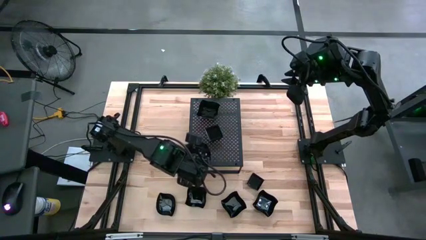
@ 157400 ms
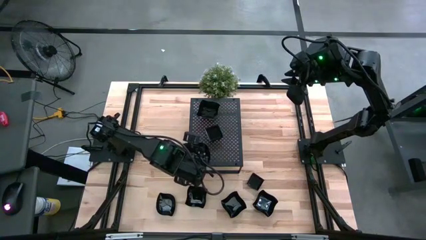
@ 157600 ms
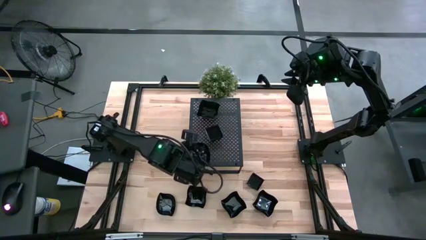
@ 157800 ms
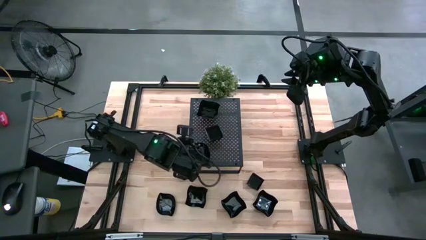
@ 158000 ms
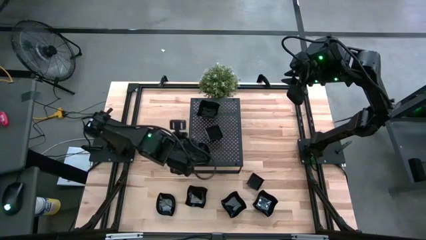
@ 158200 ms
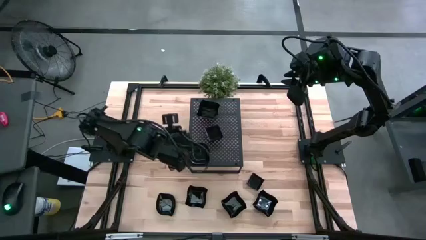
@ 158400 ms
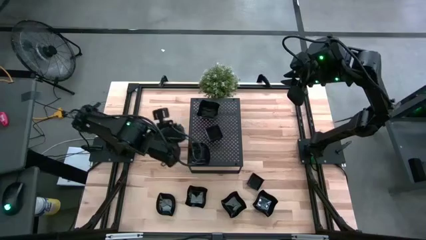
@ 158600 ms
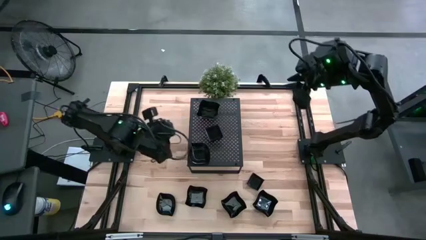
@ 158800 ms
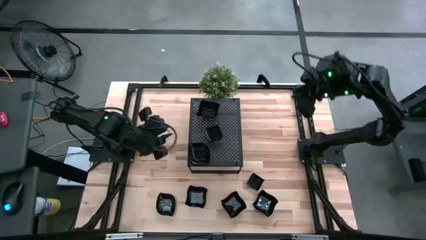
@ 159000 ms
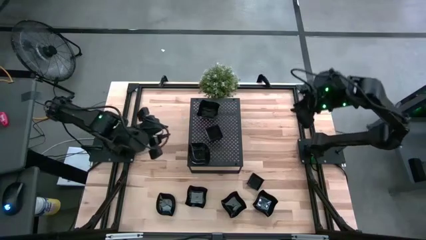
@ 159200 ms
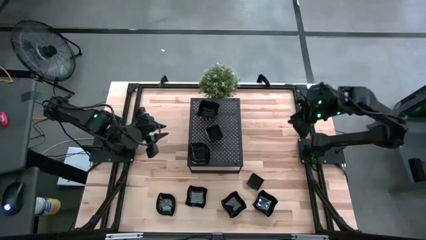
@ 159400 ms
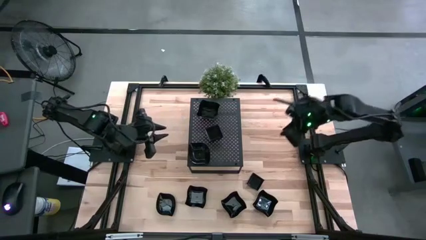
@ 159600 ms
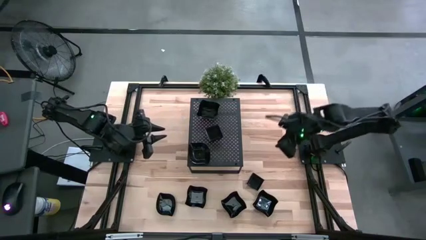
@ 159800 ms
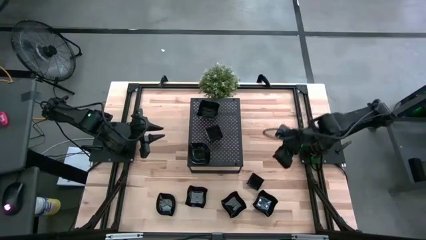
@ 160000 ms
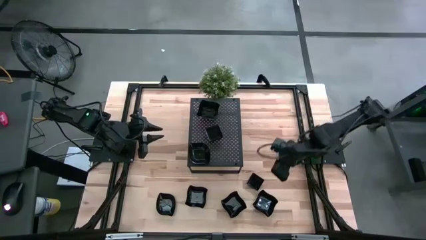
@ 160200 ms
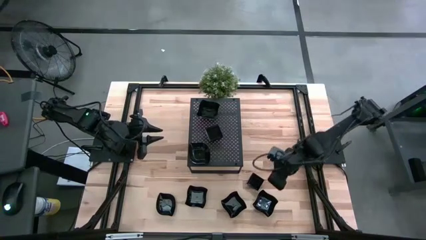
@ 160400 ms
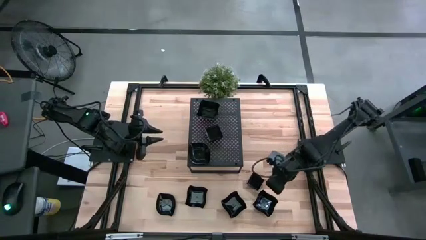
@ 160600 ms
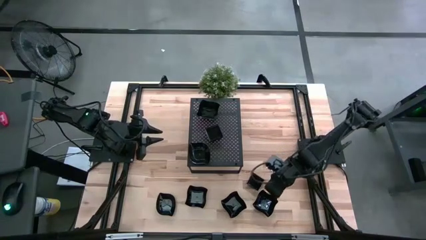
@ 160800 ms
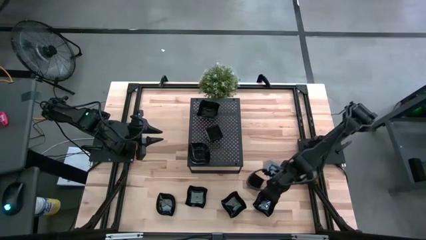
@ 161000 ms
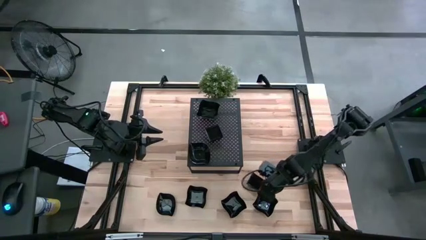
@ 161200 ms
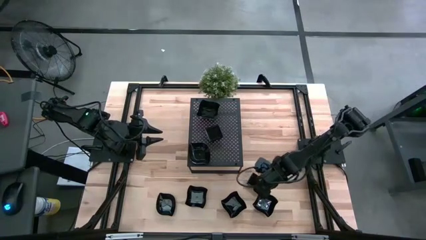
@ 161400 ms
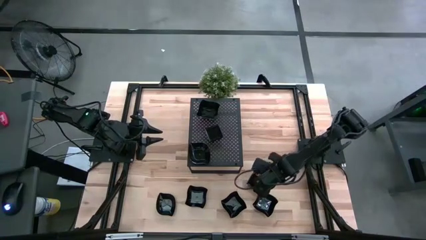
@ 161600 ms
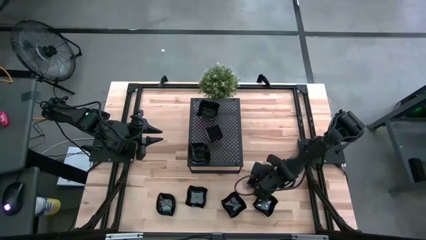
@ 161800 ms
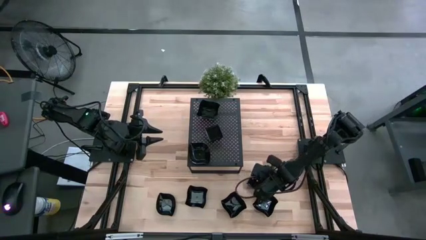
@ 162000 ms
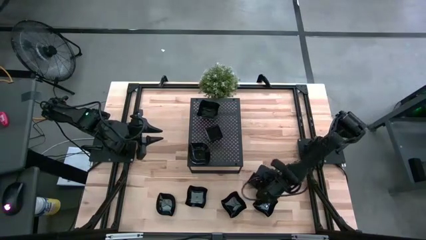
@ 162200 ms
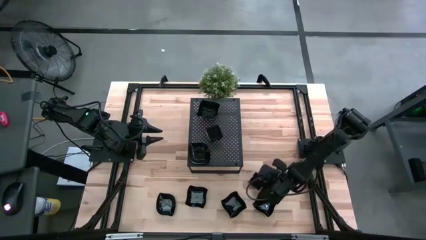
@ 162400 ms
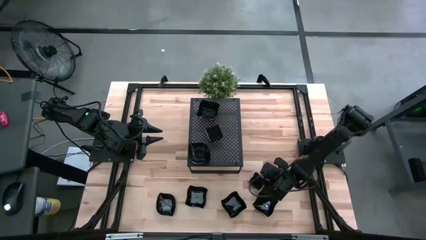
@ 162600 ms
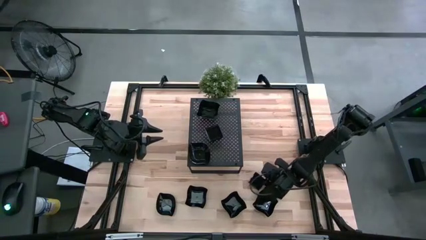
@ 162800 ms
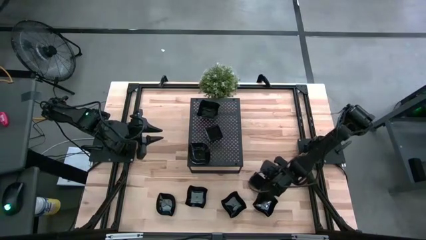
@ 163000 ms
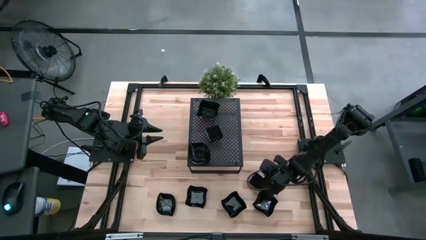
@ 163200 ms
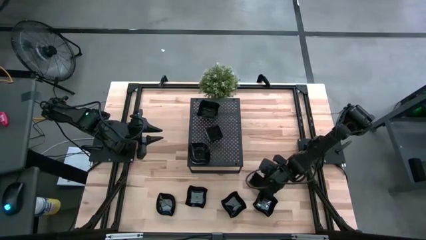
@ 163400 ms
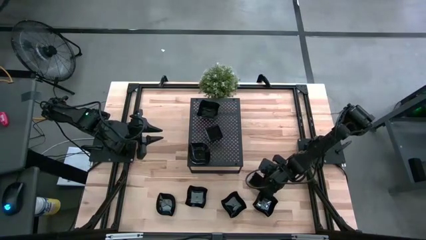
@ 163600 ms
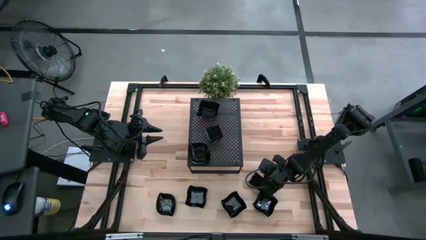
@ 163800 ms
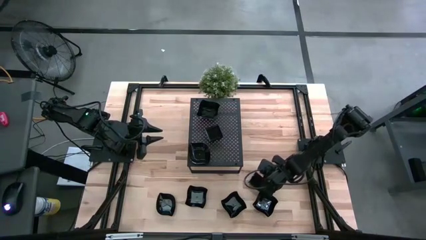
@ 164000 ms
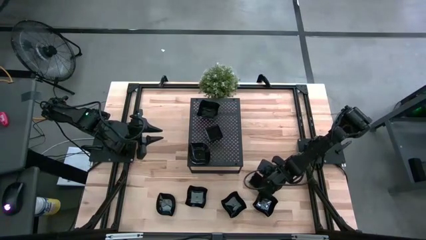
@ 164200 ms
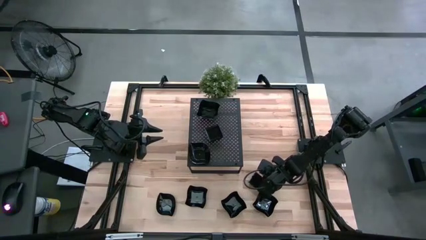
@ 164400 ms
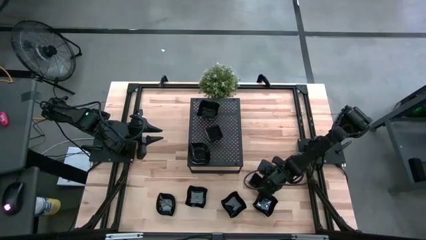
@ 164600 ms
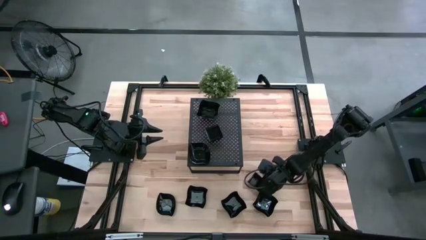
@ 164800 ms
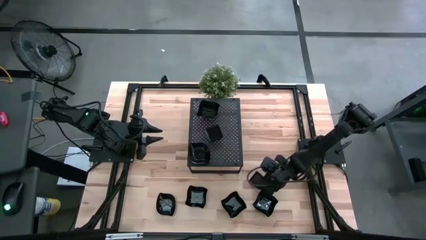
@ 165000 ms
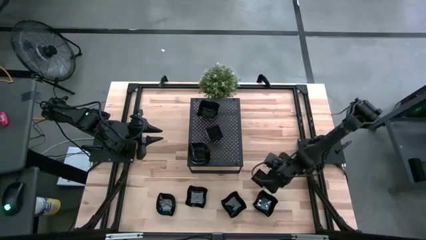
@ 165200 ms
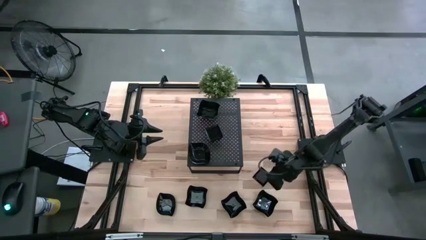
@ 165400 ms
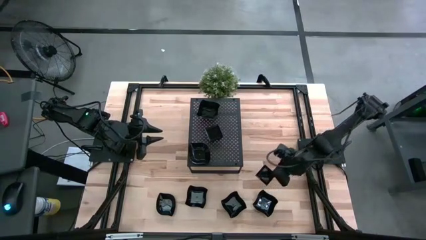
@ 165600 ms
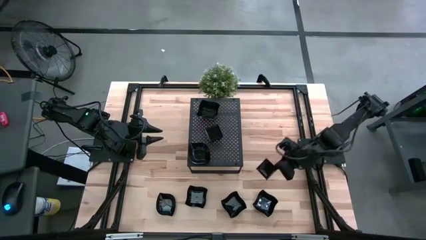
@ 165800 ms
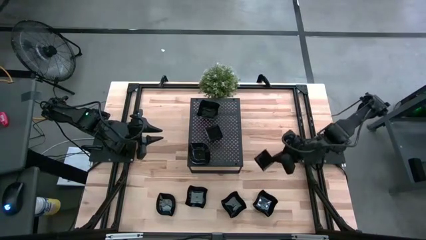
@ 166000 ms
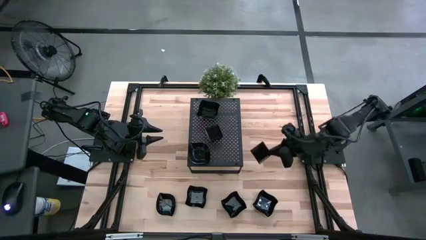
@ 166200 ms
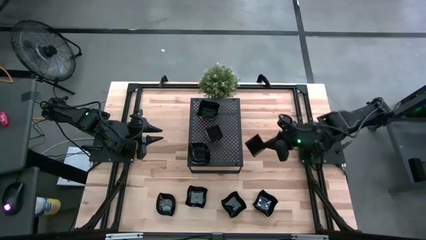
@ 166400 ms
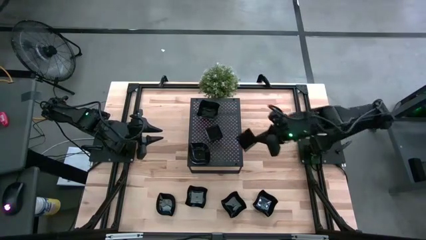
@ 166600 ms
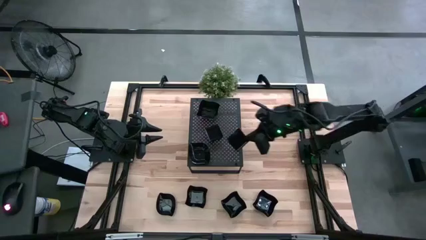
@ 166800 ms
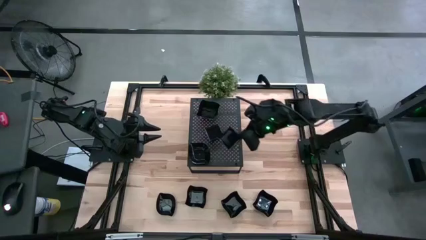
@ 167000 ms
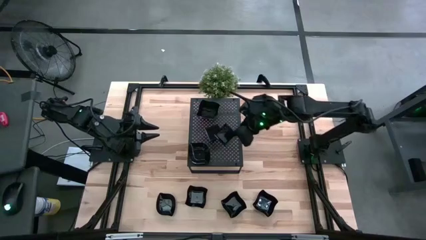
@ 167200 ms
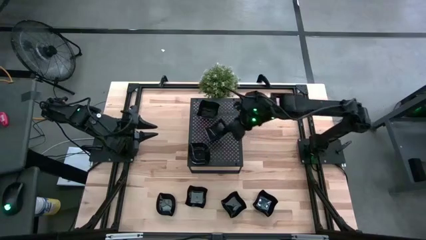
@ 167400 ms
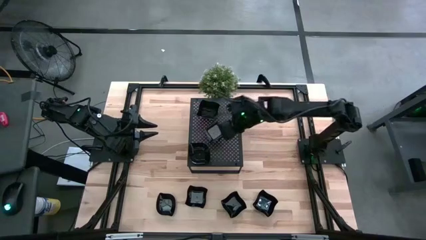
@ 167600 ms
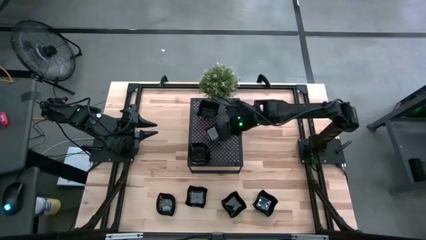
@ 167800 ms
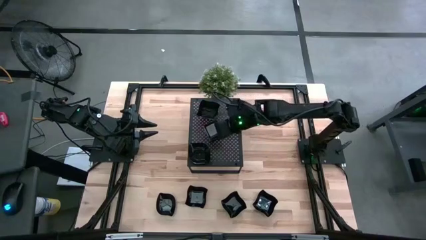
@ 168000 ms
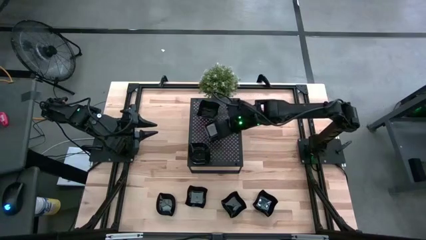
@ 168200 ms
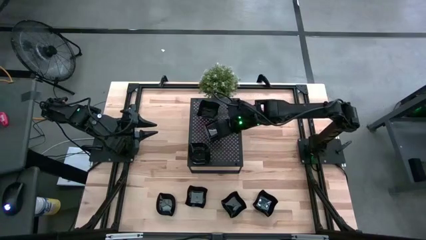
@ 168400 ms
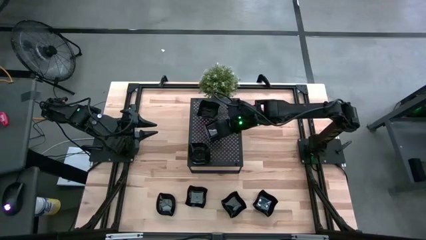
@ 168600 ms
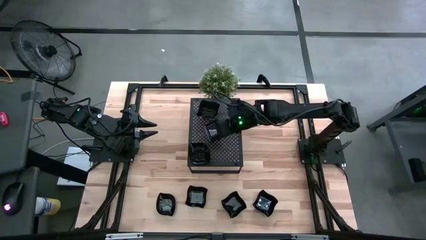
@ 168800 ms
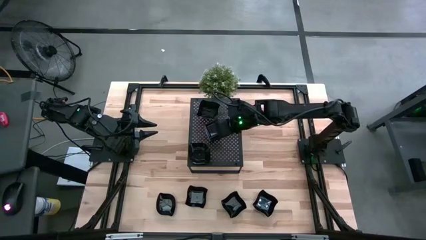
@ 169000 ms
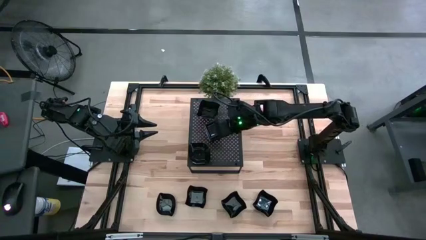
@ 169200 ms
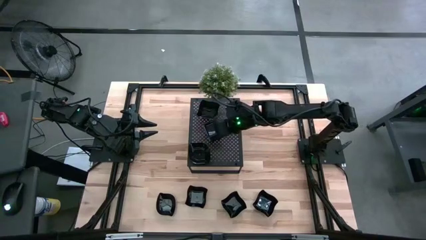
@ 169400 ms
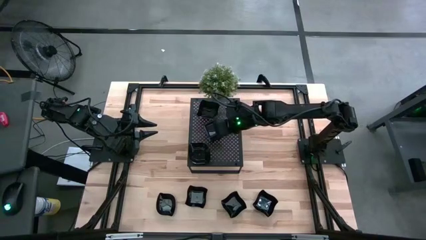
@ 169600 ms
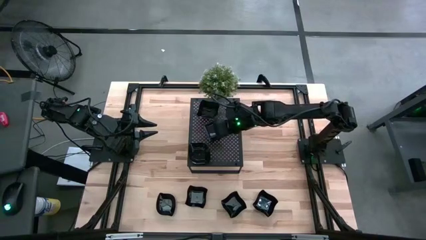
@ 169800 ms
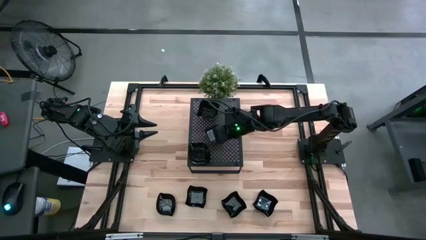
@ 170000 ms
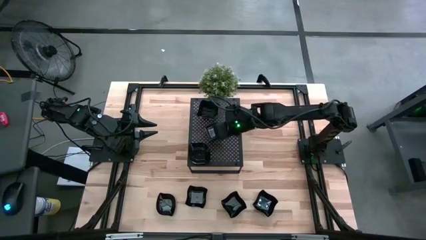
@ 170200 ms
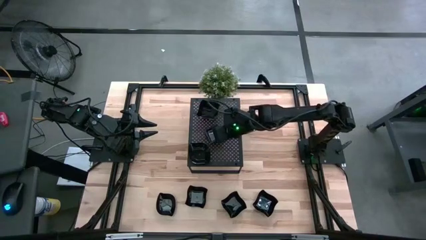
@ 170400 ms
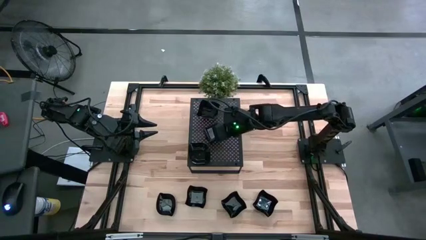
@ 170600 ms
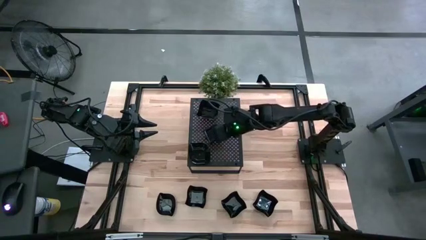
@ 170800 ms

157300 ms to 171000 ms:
Task: Pick & Place Mini shaped plates
Stack the square plate on top of the square plates on the shelf
